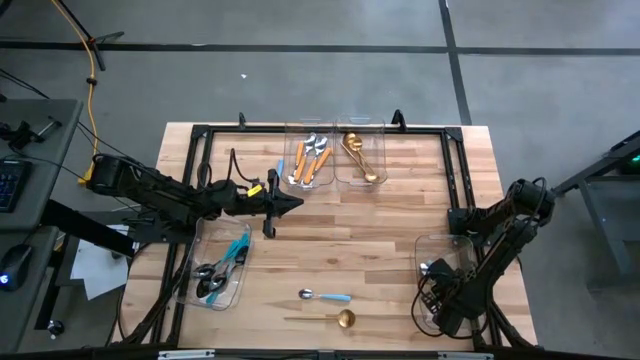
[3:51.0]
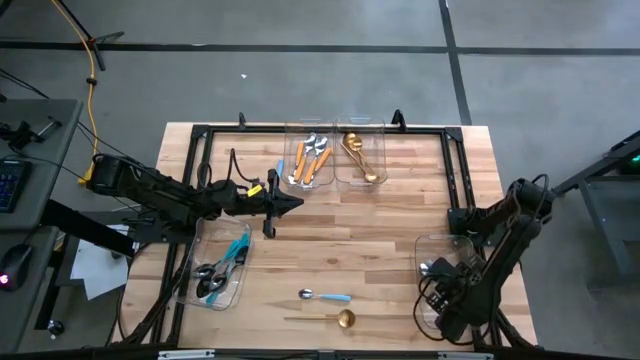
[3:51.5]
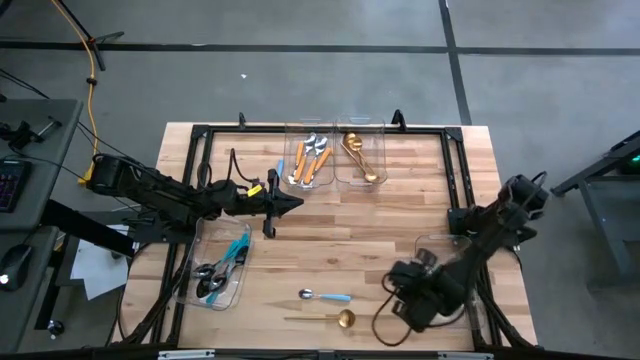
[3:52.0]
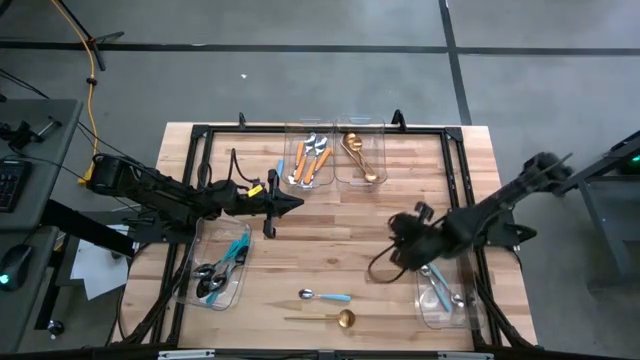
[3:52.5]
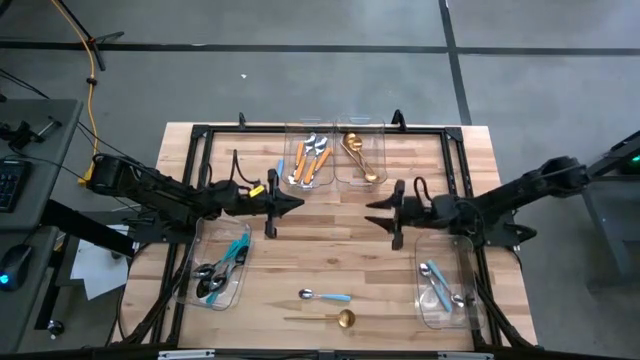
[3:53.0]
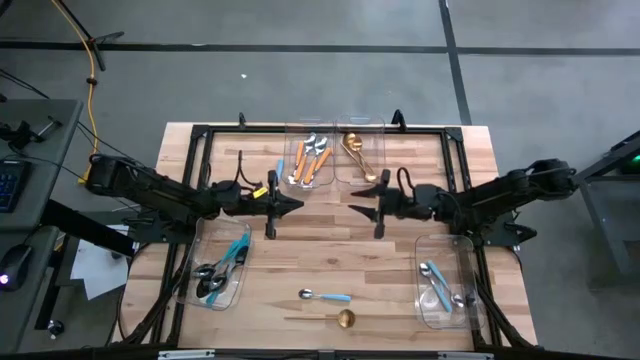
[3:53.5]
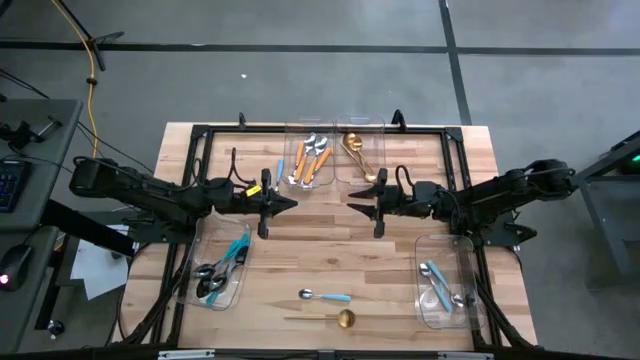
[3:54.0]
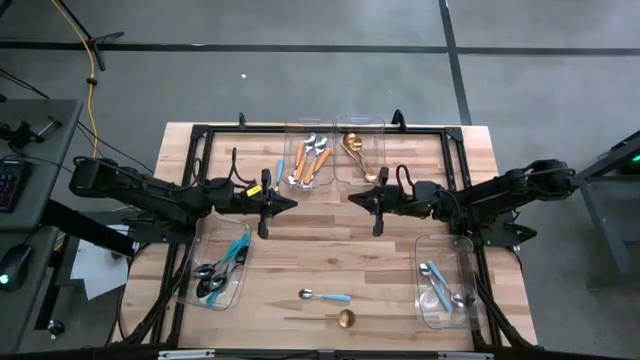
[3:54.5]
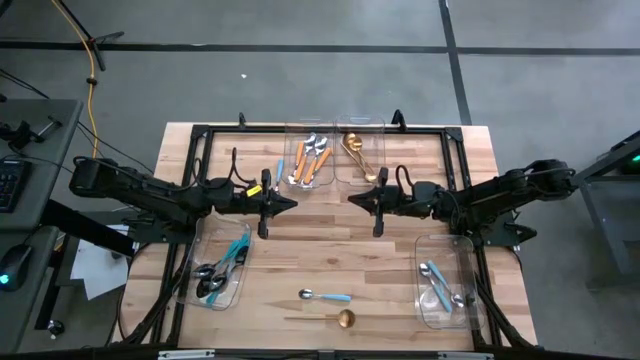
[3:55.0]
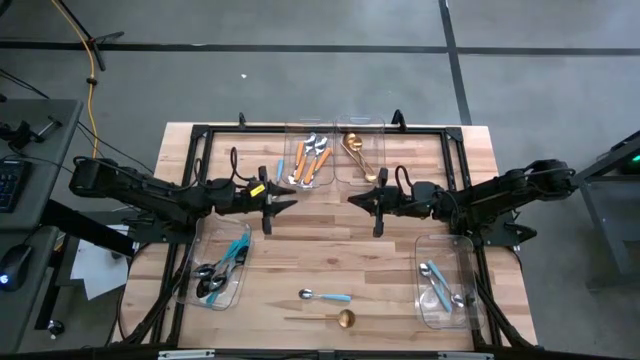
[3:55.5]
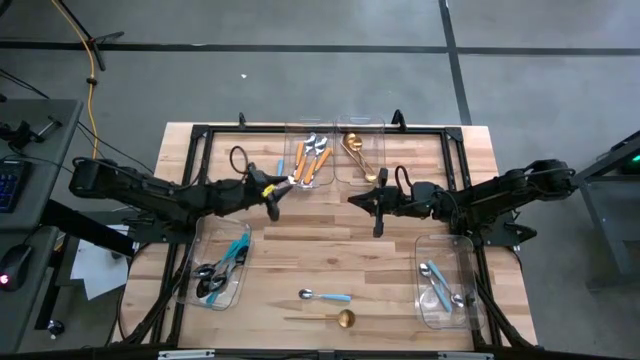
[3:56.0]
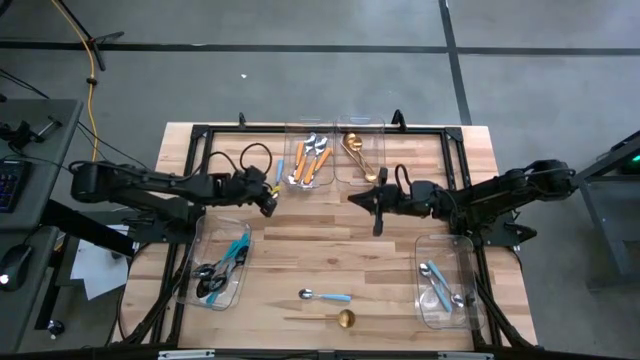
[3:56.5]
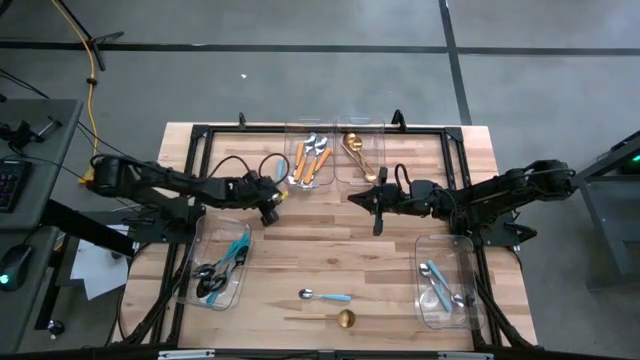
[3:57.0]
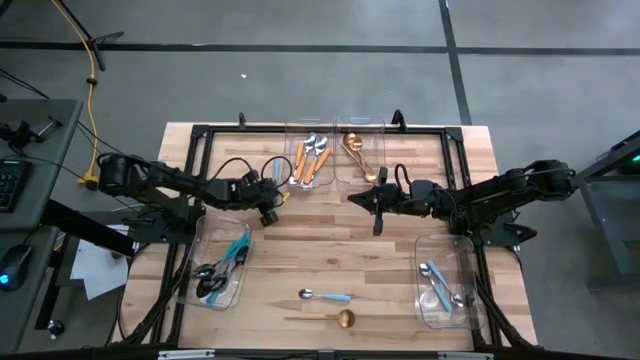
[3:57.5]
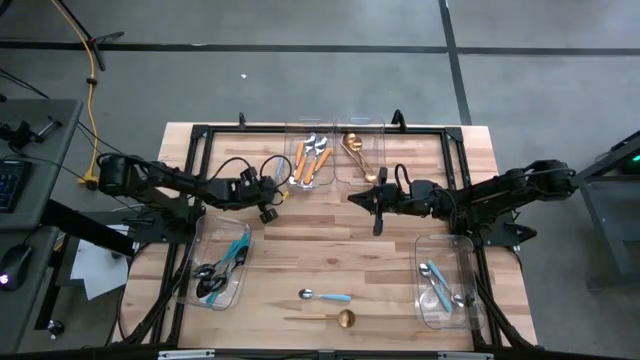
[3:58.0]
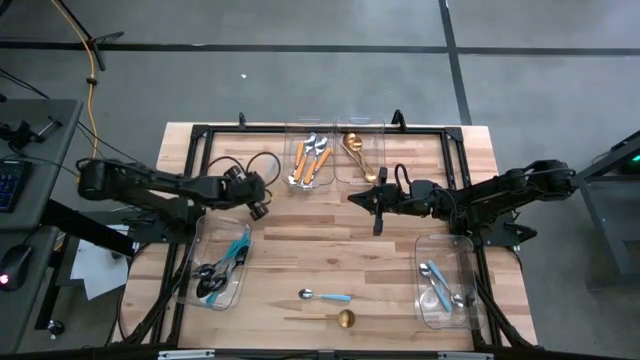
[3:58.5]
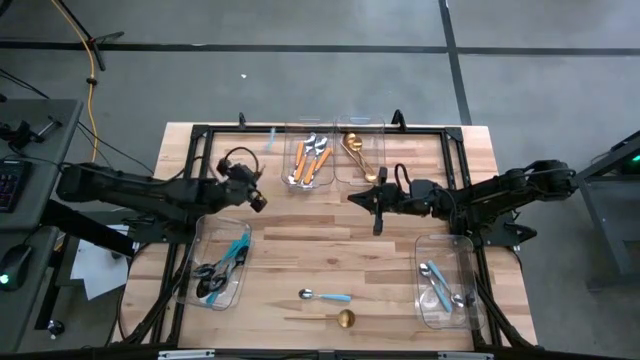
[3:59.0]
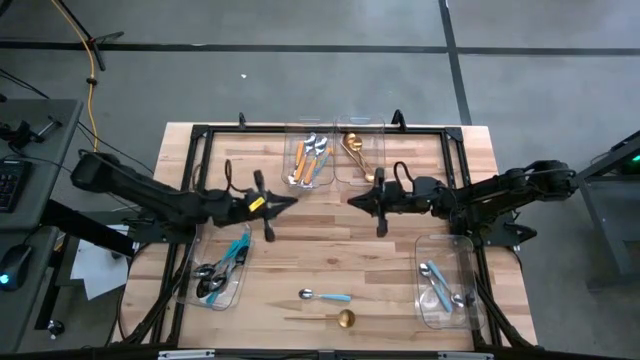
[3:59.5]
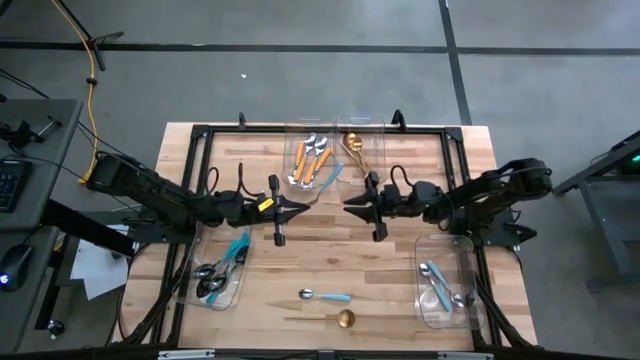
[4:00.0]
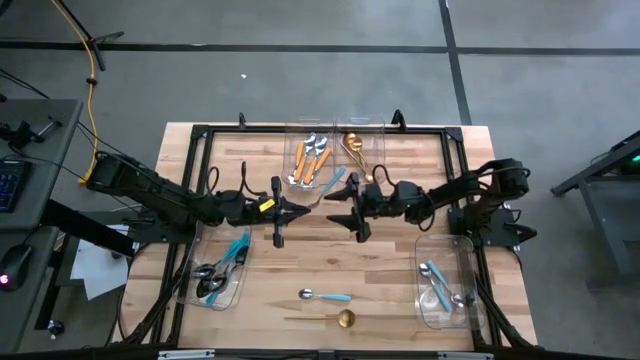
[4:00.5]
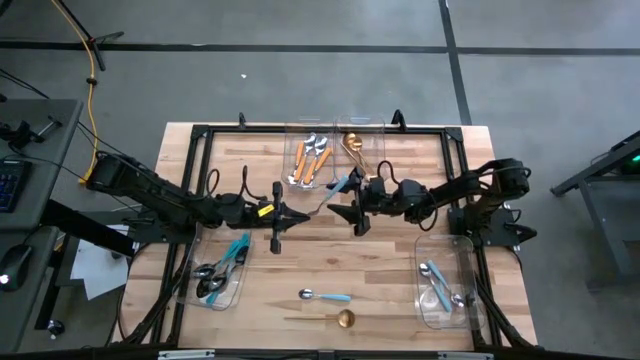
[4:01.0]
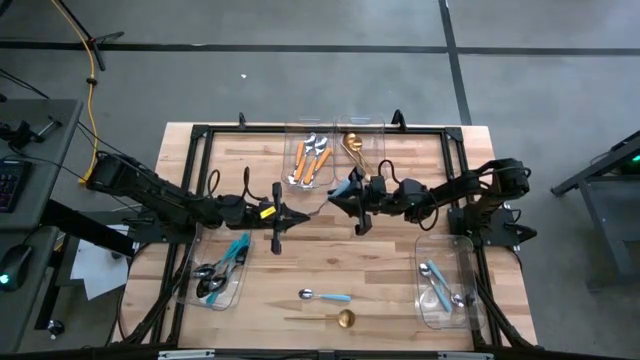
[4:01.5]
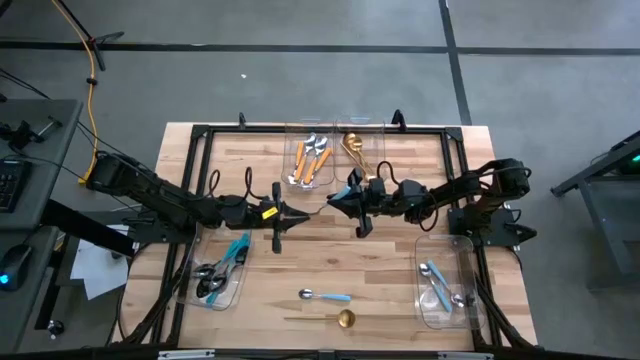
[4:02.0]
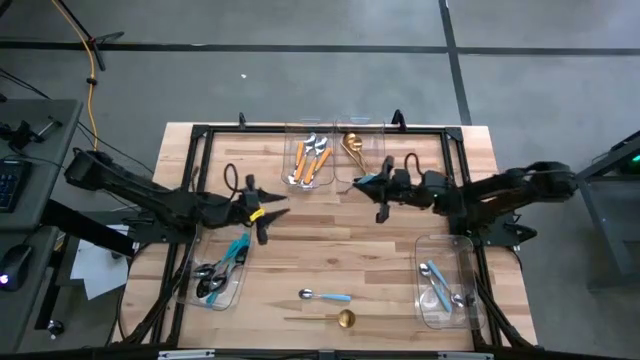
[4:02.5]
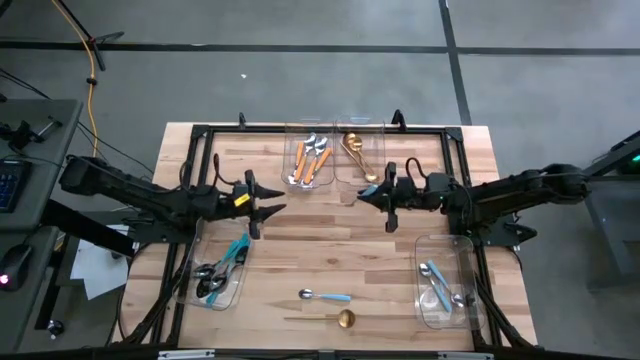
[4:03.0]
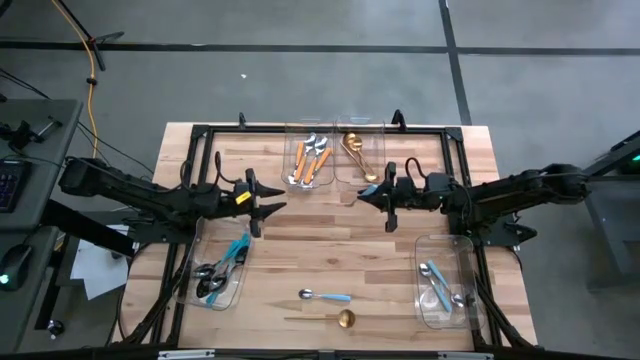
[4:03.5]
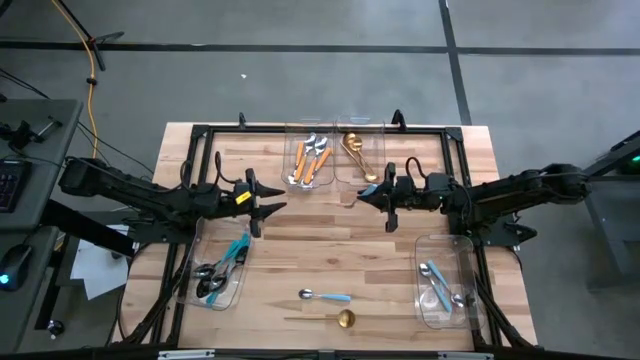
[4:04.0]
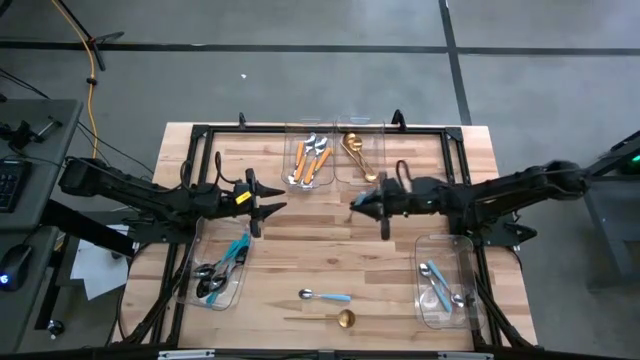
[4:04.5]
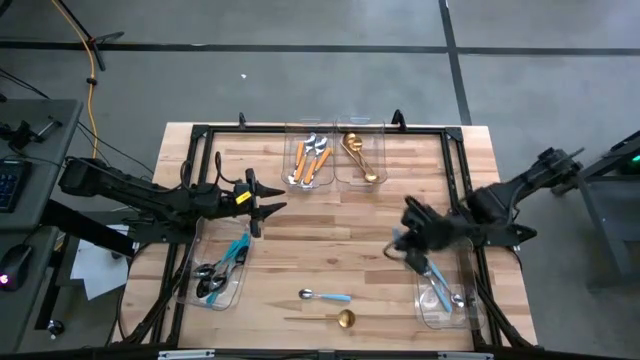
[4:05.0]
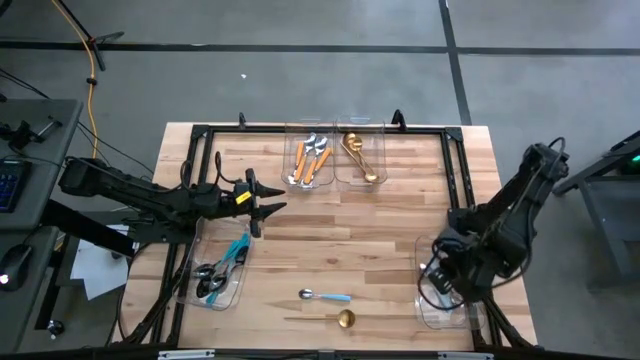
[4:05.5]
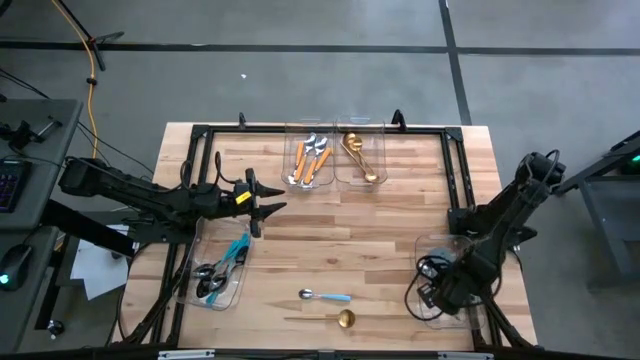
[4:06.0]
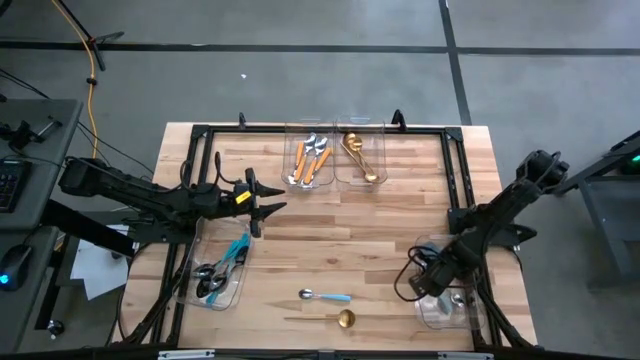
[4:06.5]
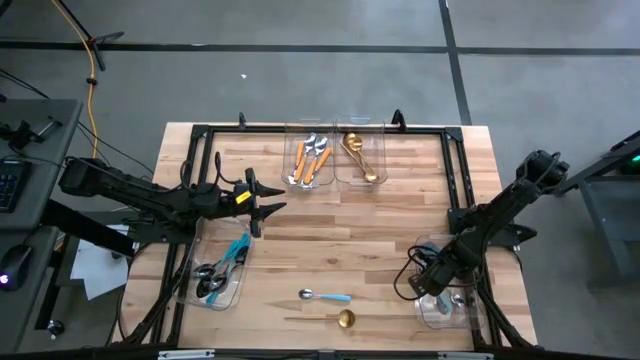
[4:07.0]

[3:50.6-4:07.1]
Task: Sort silverware by color (type)
Put the blue spoon into the bottom right transparent bin
